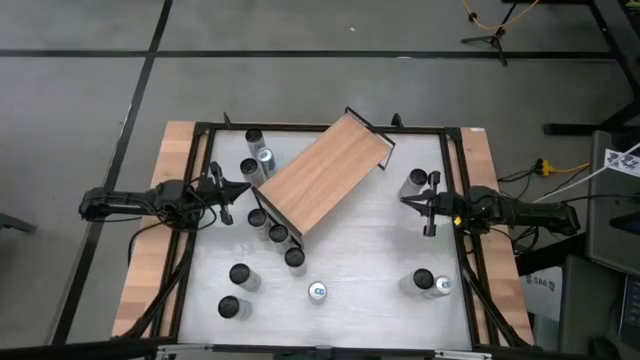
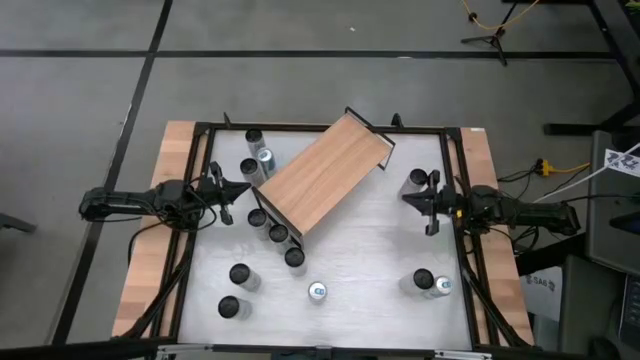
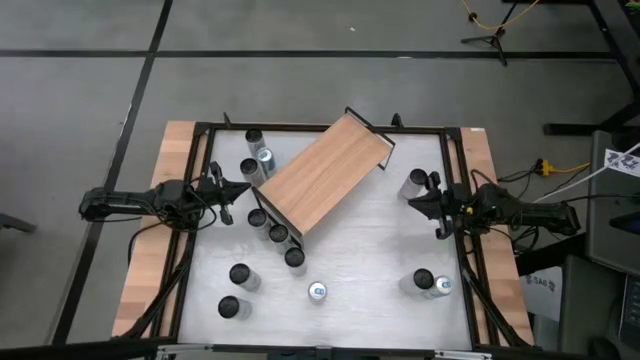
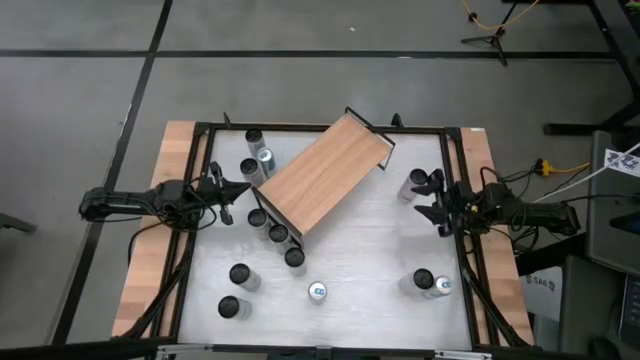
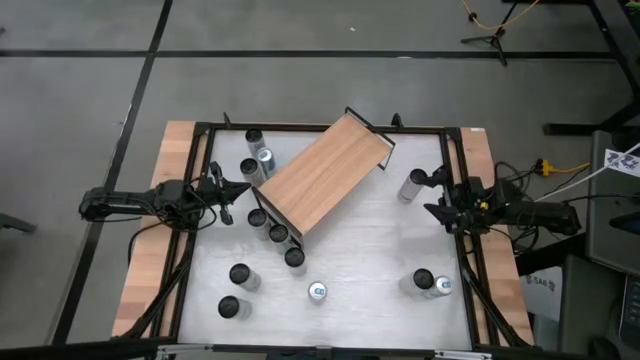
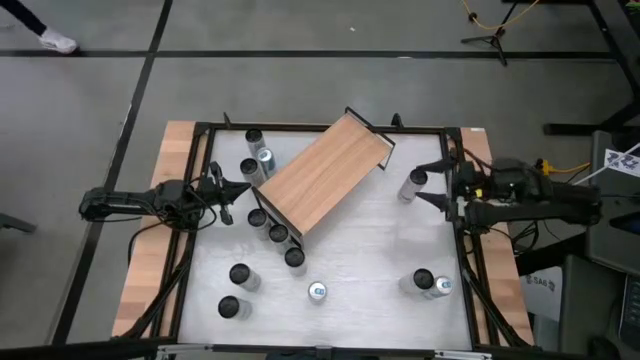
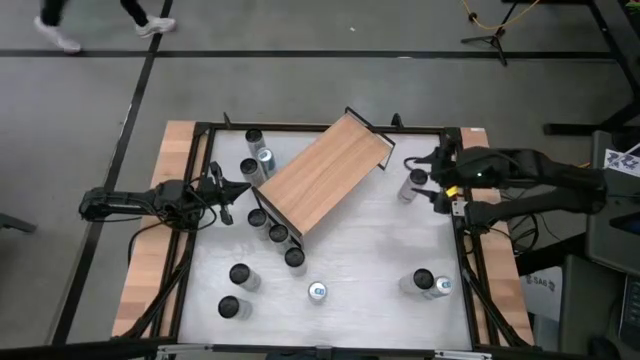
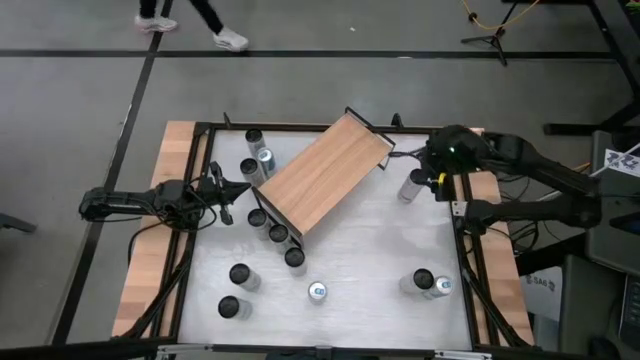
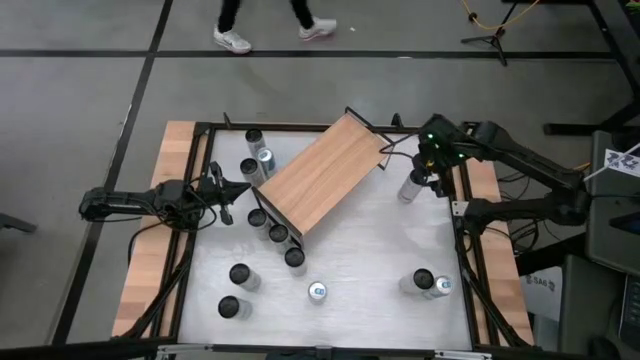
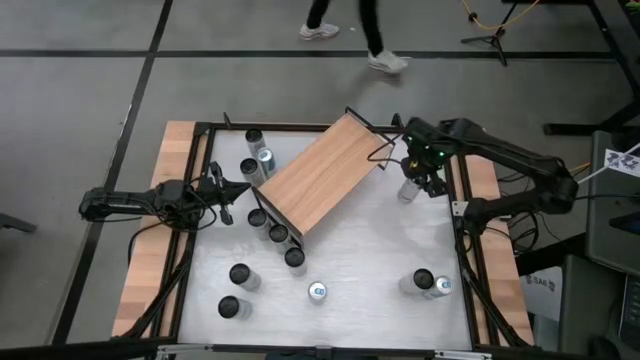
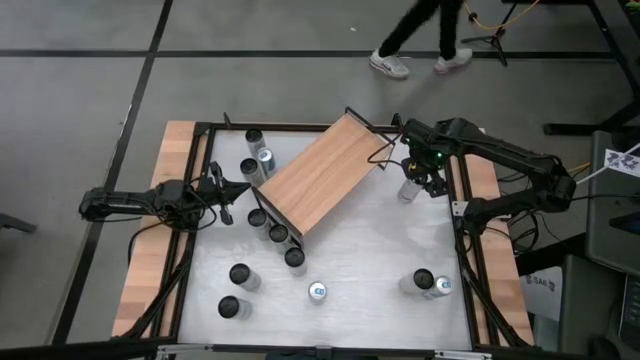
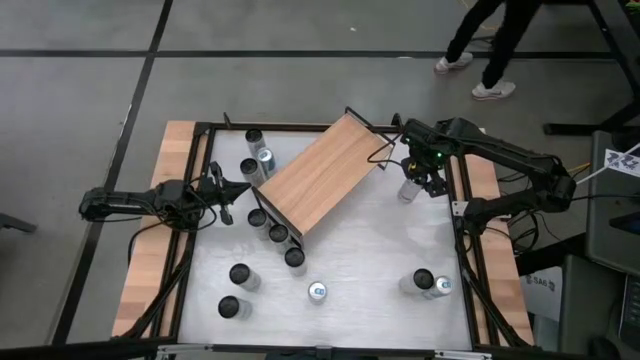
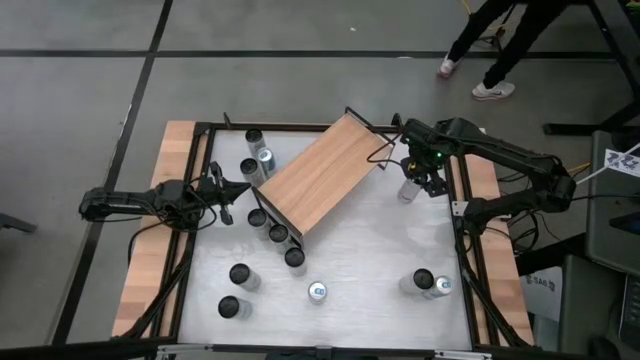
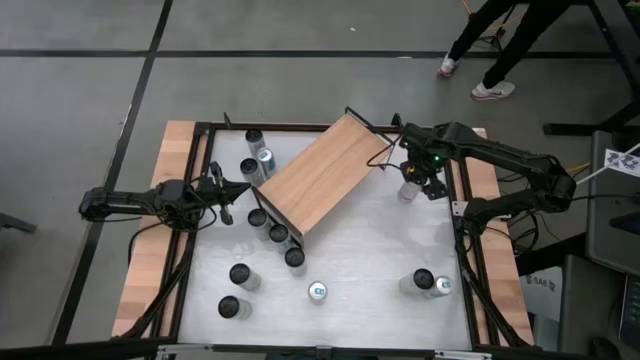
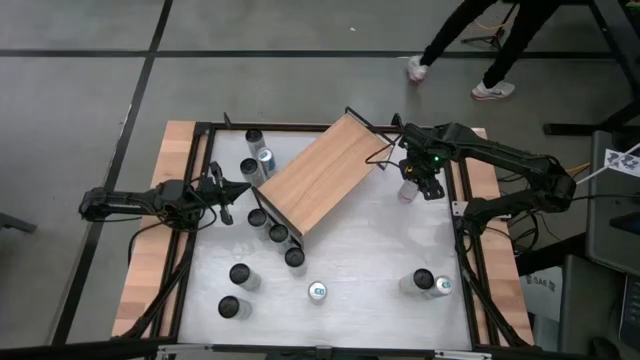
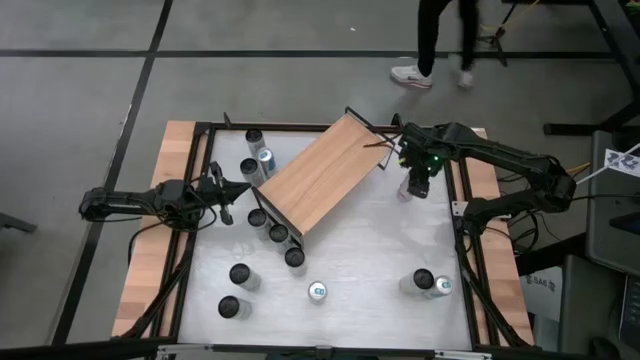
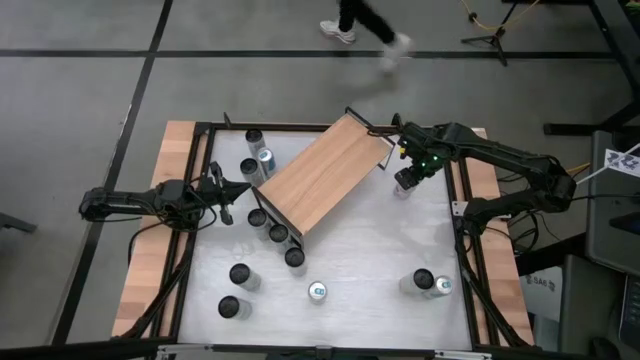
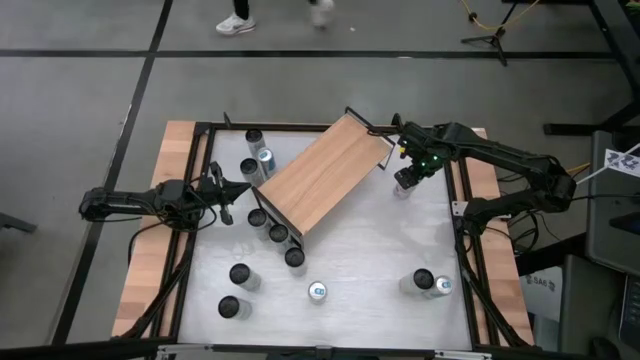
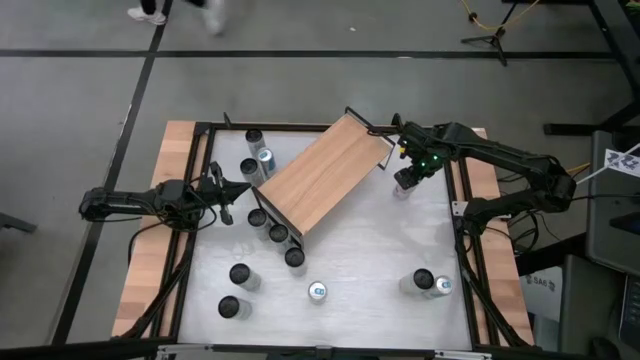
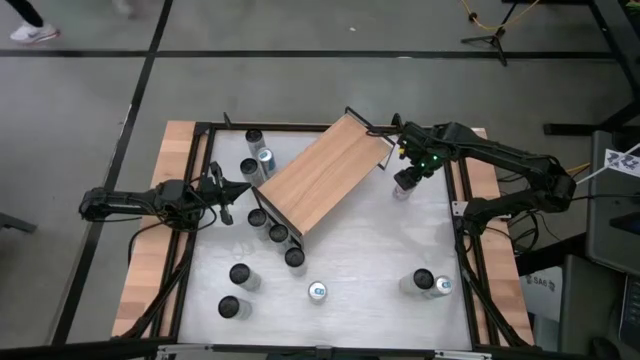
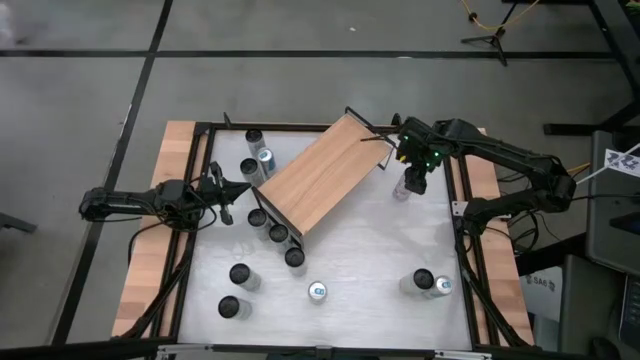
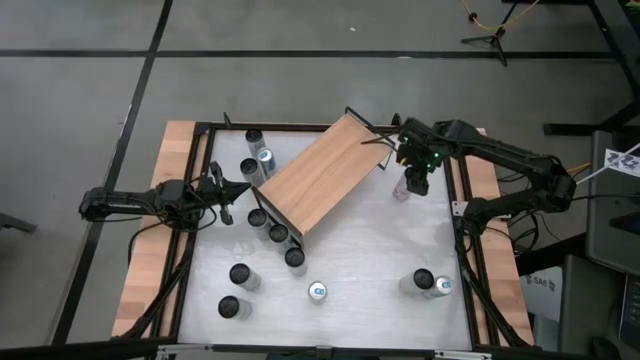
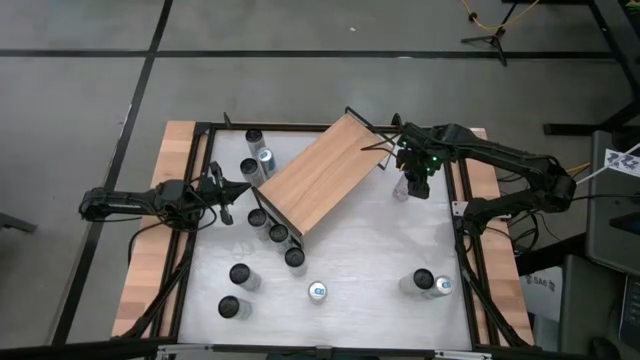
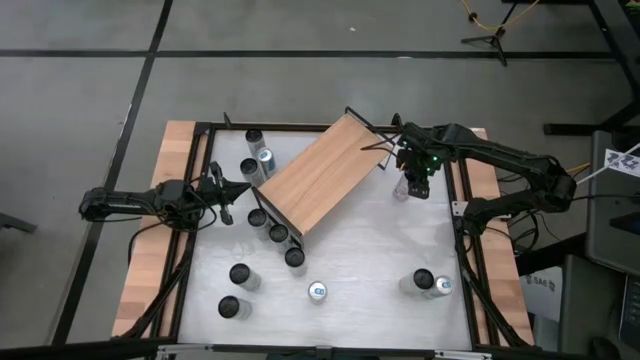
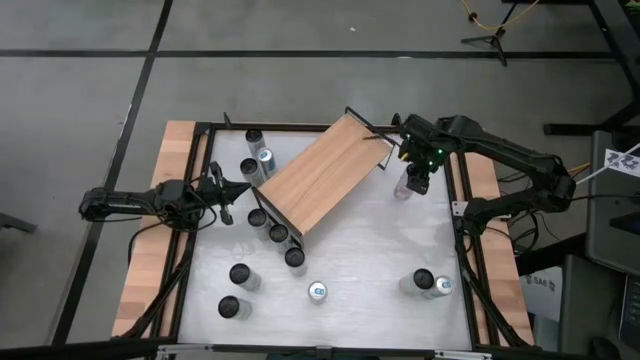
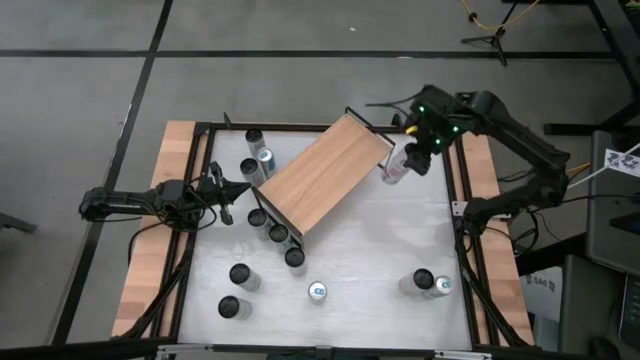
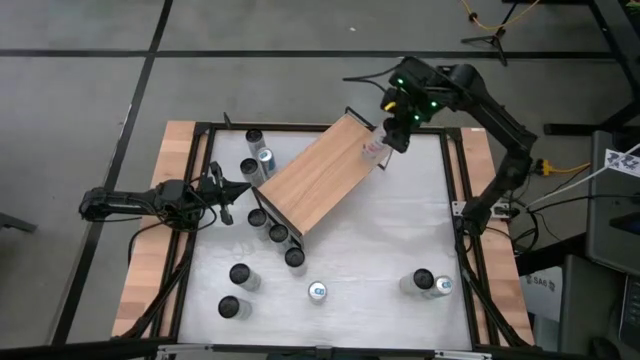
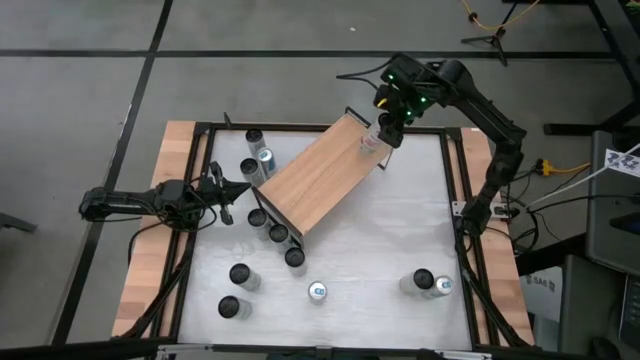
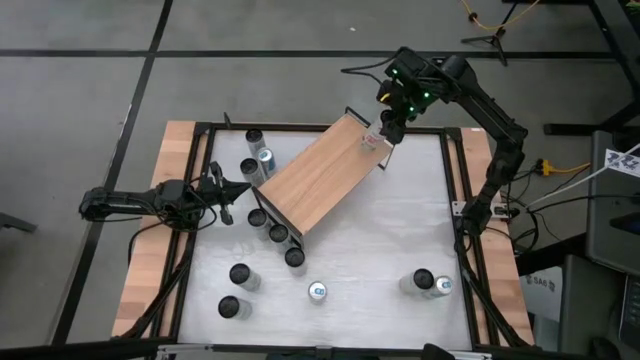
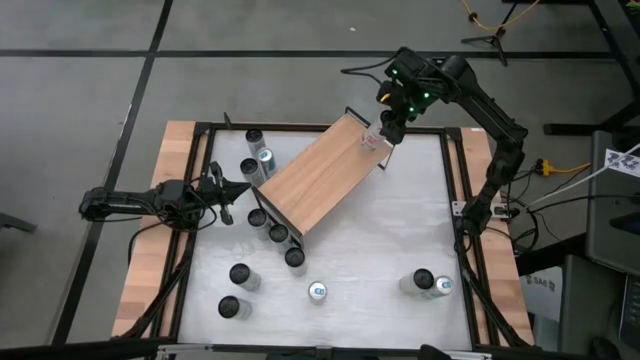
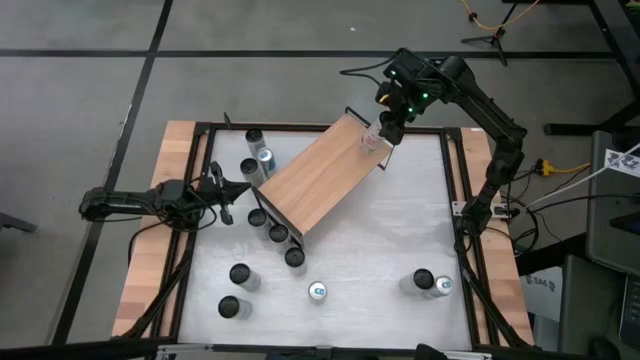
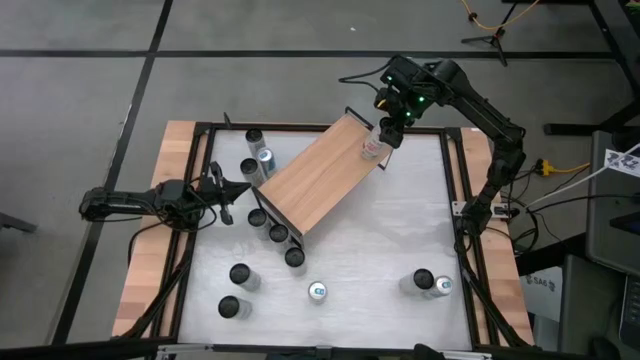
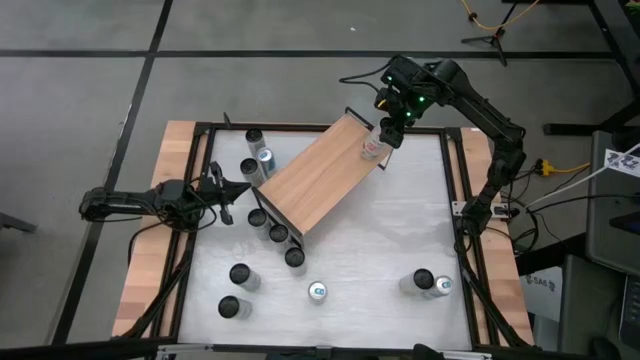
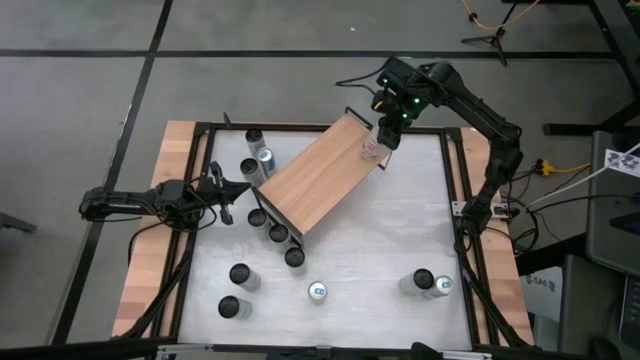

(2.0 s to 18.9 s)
Task: Place canned beverage on shelf
Put the white-pink soda can on the shelf
